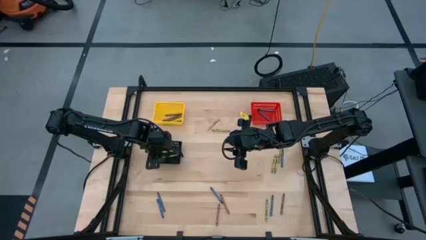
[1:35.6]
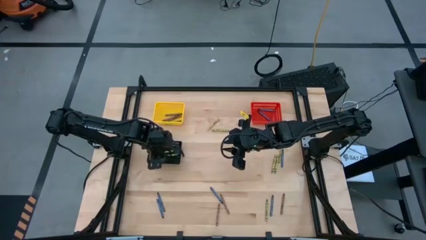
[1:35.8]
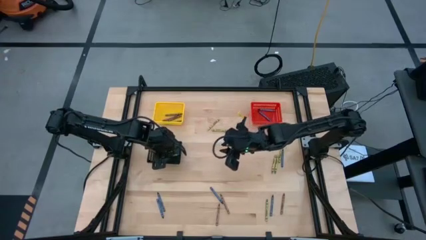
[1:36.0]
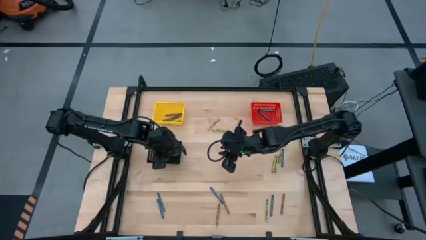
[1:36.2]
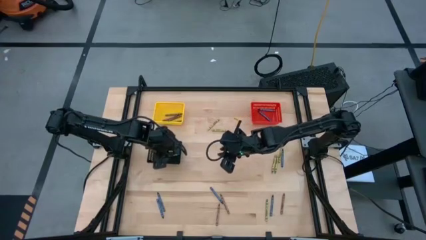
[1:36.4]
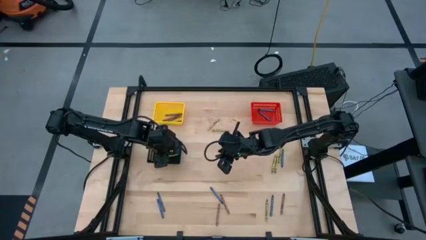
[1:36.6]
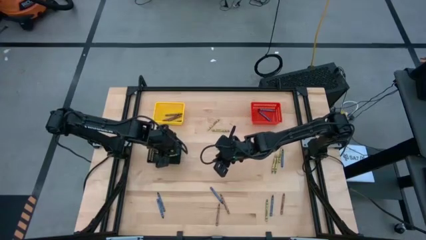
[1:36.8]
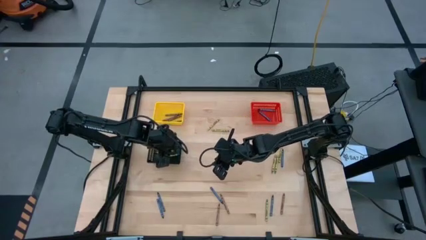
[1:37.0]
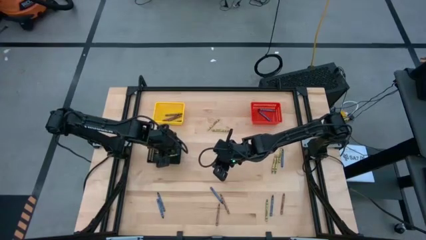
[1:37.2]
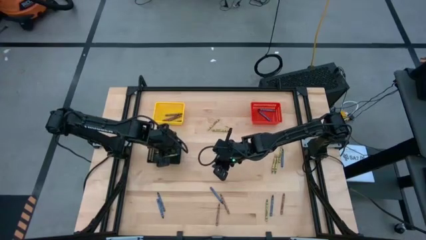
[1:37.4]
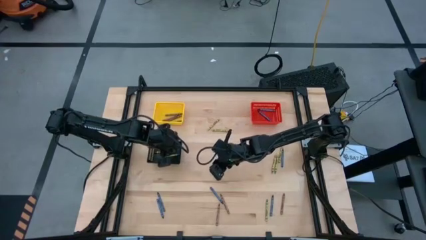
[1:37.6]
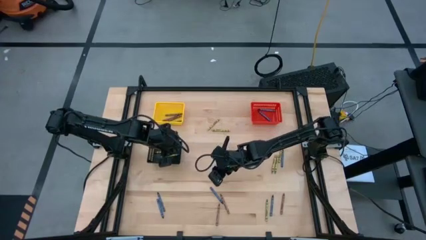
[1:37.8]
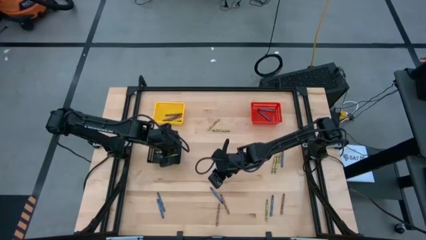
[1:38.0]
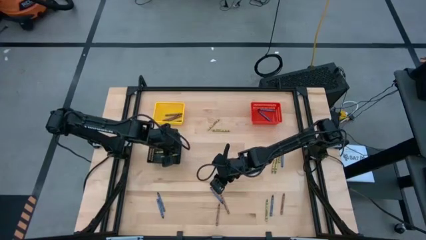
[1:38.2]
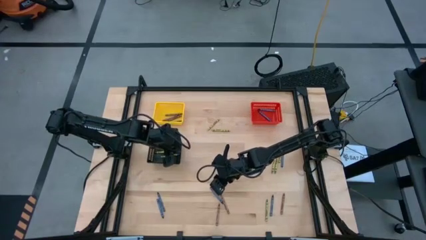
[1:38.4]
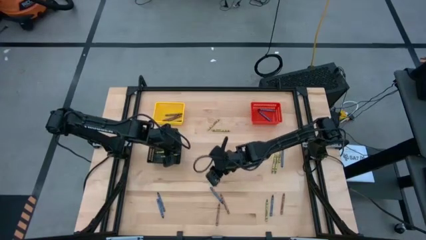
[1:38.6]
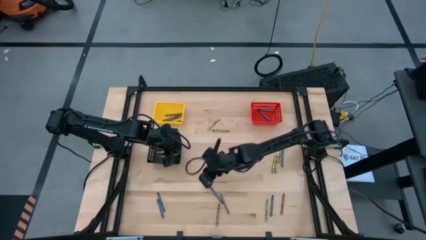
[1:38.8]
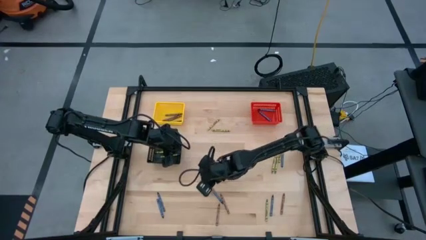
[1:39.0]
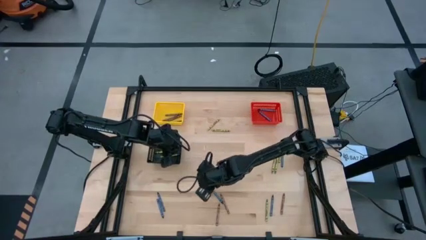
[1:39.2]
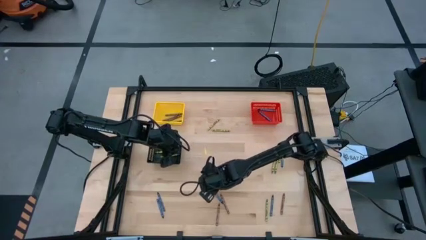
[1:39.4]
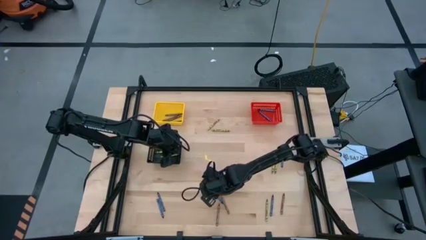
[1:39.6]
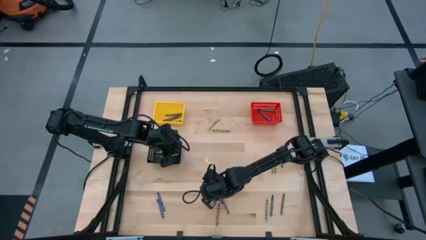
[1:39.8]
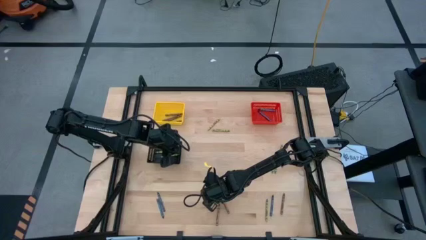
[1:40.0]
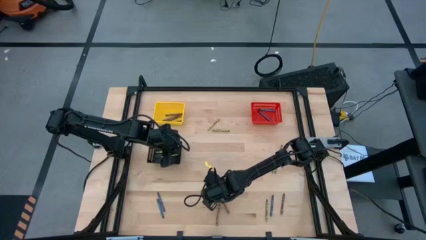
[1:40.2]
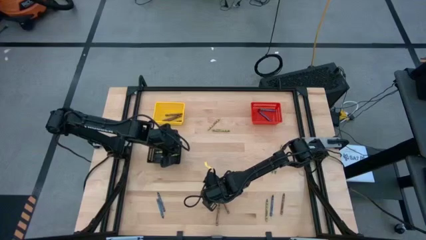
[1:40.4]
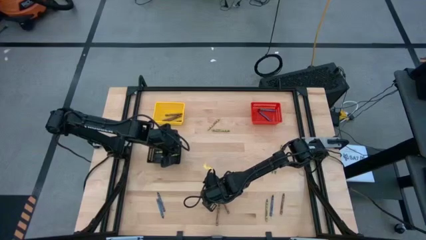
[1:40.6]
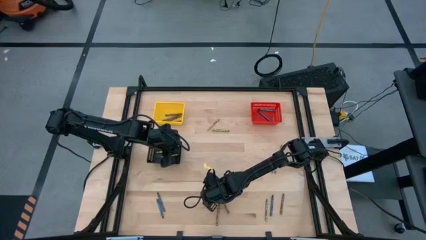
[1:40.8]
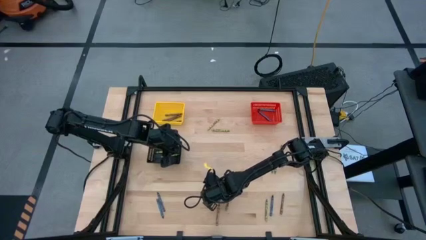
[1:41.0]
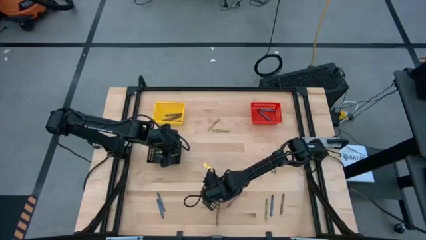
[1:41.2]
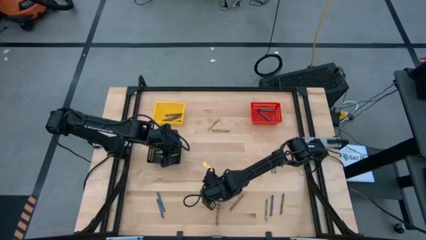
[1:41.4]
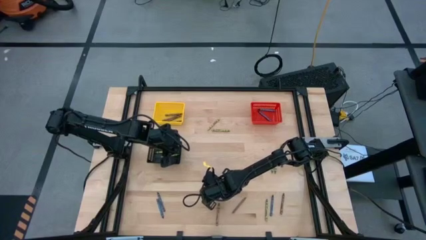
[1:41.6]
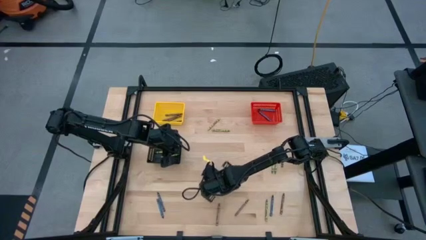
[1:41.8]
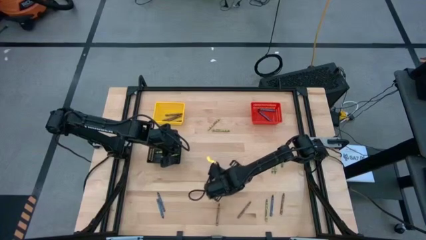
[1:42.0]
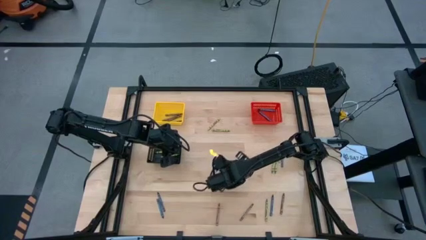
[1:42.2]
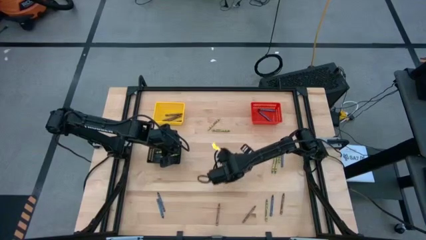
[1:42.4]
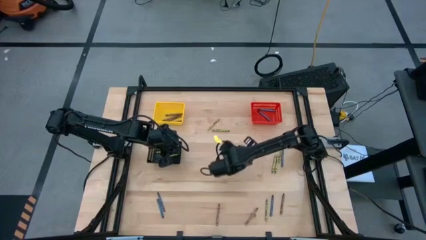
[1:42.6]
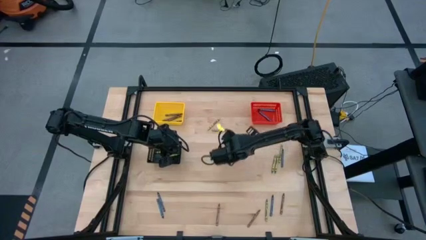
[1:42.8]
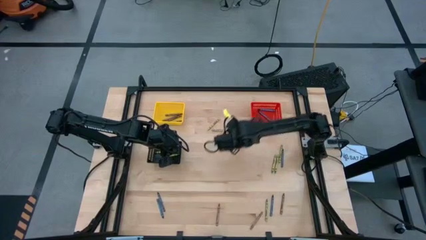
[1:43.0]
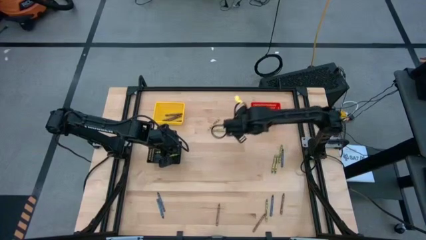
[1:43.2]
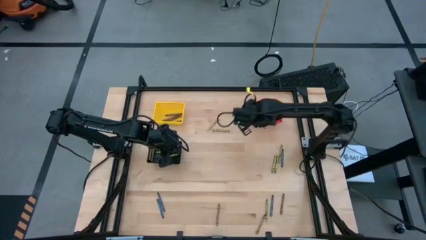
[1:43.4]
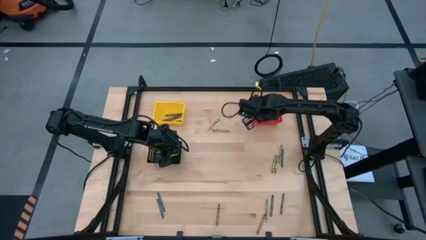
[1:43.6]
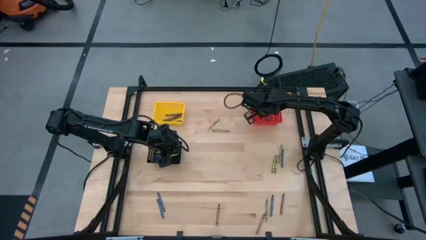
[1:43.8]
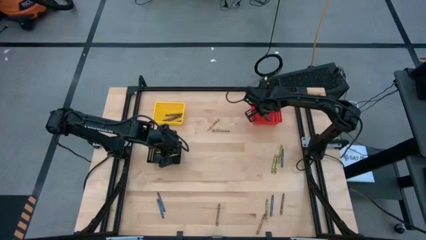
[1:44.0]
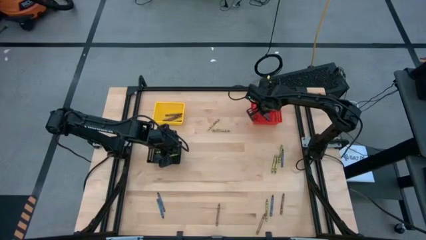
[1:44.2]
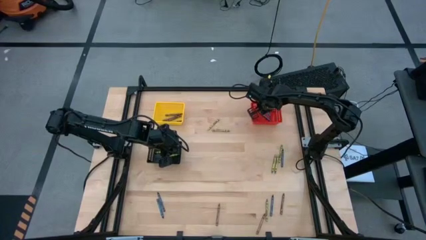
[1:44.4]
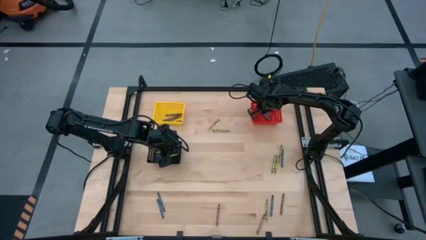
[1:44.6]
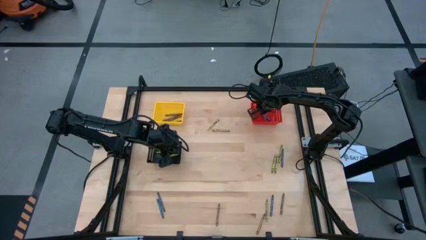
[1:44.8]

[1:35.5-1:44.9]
Task: Sort crayons
Put the blue crayon into the red bin

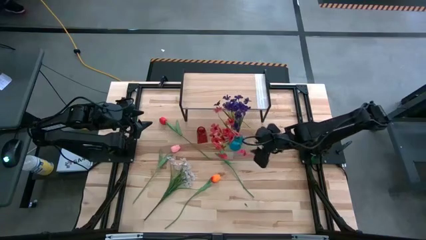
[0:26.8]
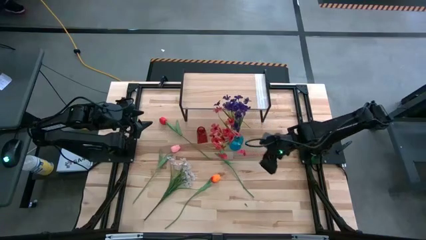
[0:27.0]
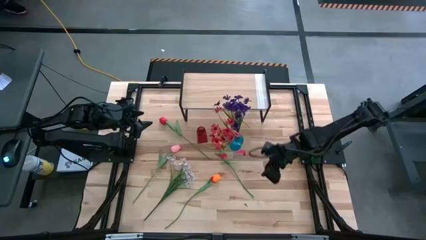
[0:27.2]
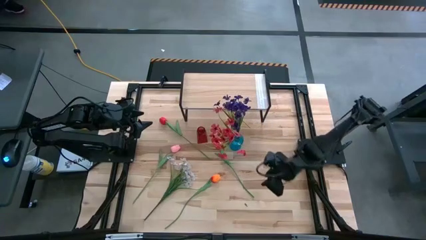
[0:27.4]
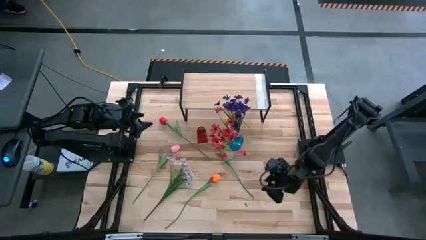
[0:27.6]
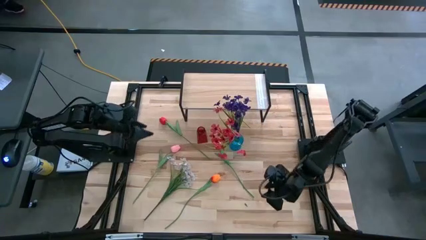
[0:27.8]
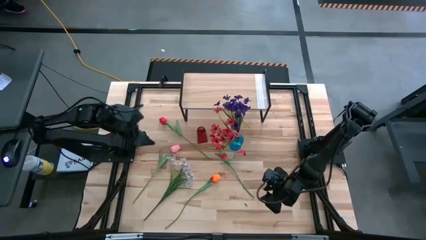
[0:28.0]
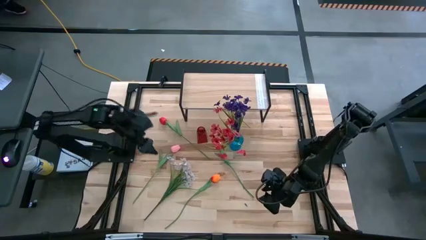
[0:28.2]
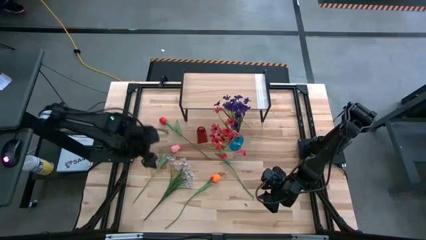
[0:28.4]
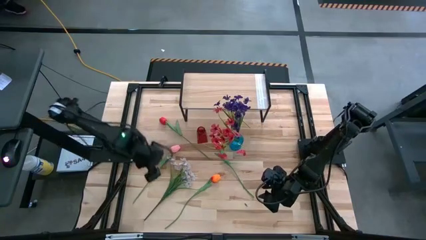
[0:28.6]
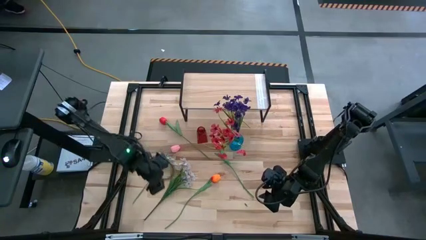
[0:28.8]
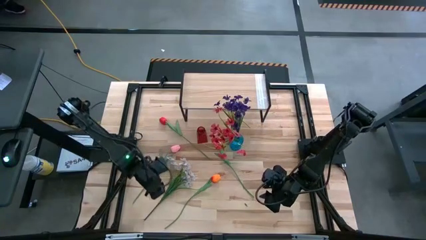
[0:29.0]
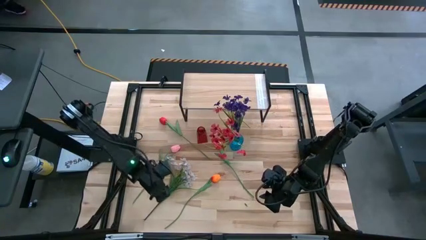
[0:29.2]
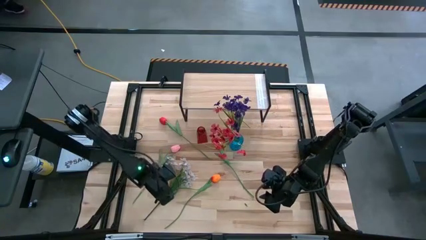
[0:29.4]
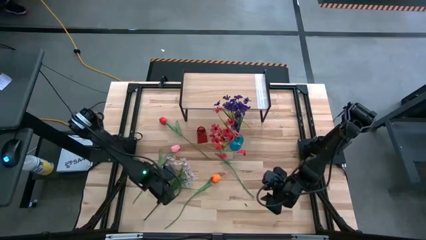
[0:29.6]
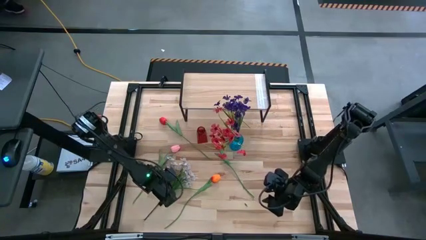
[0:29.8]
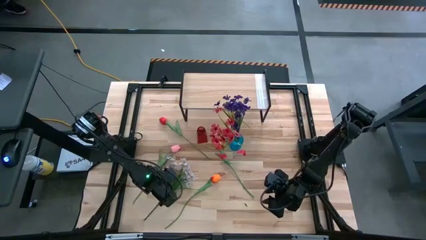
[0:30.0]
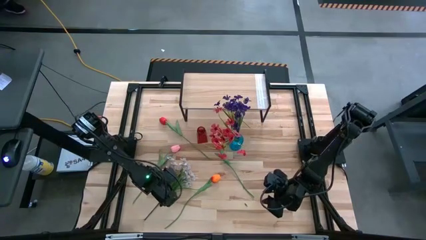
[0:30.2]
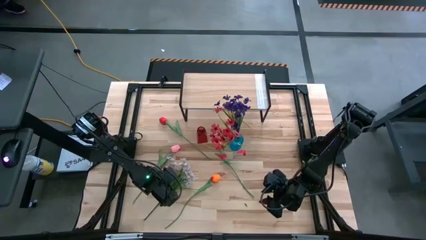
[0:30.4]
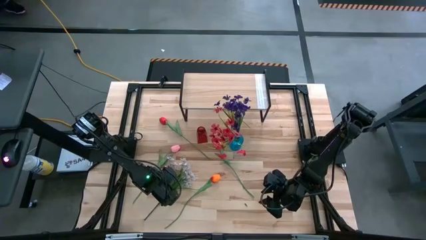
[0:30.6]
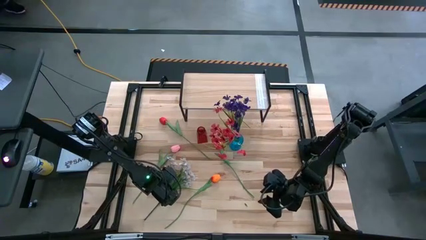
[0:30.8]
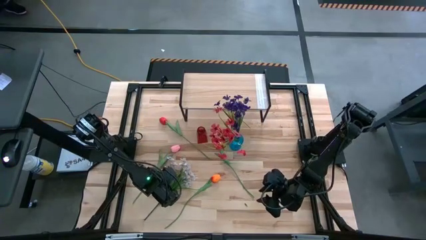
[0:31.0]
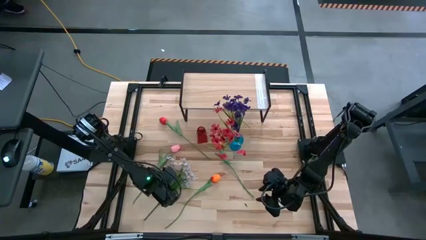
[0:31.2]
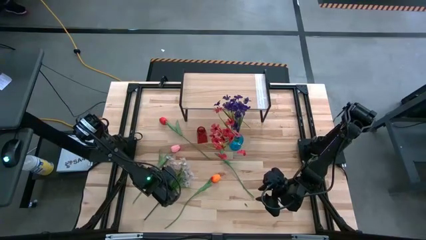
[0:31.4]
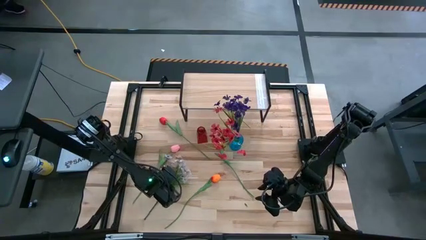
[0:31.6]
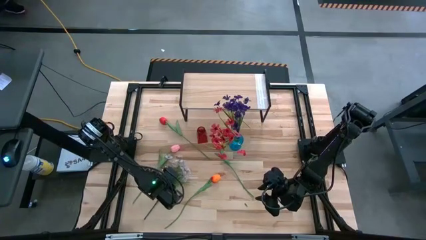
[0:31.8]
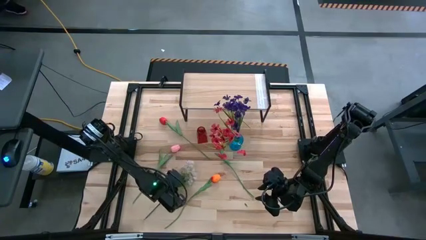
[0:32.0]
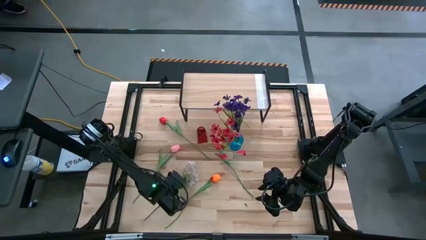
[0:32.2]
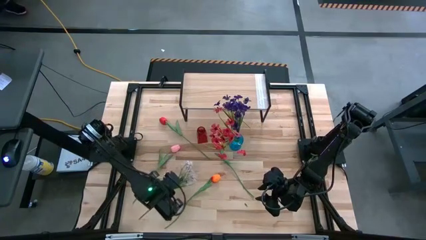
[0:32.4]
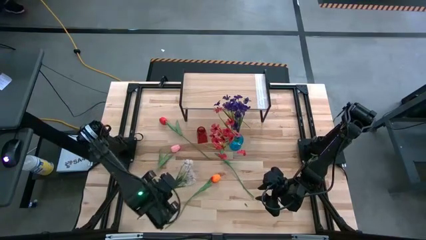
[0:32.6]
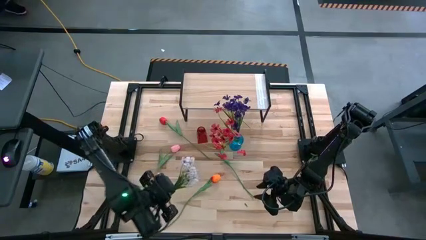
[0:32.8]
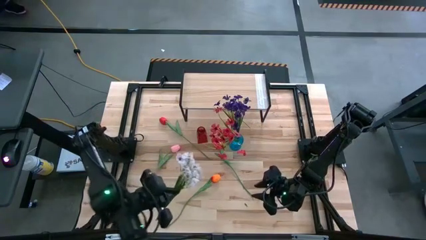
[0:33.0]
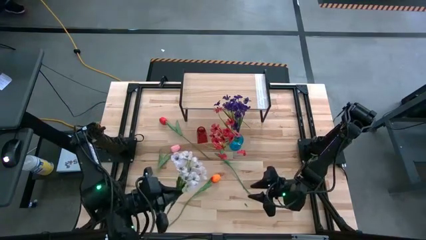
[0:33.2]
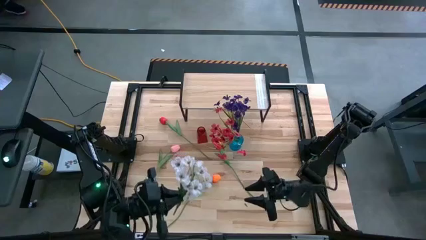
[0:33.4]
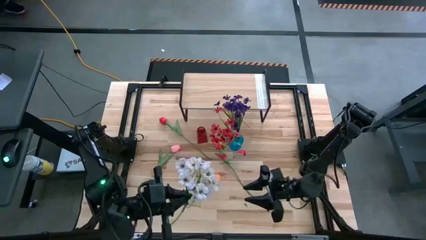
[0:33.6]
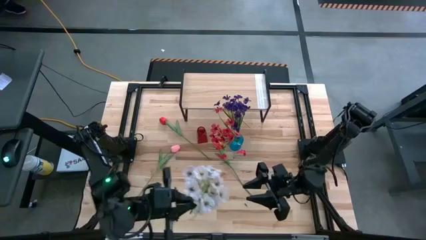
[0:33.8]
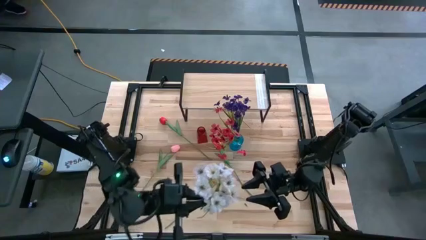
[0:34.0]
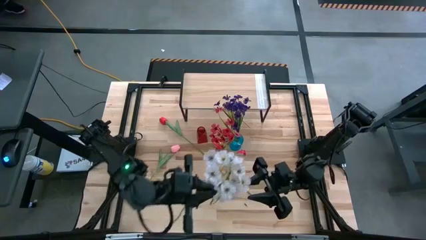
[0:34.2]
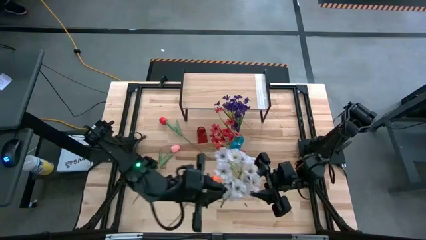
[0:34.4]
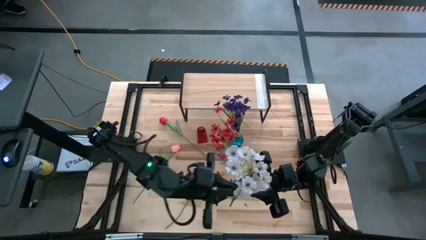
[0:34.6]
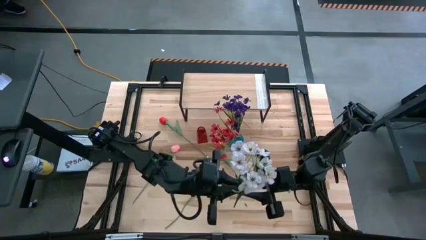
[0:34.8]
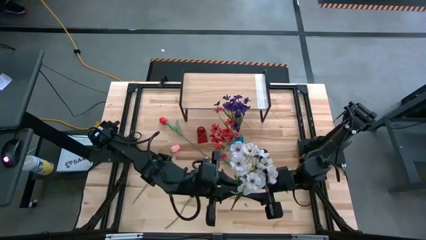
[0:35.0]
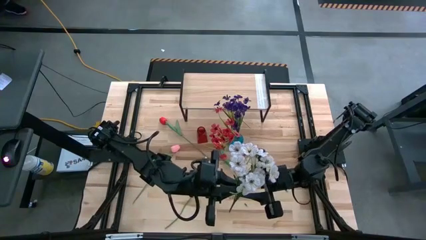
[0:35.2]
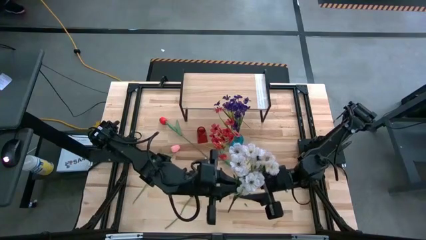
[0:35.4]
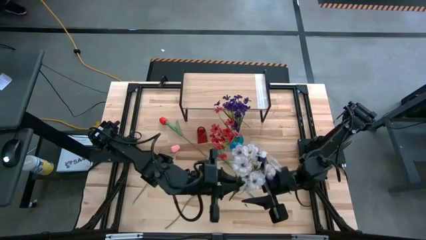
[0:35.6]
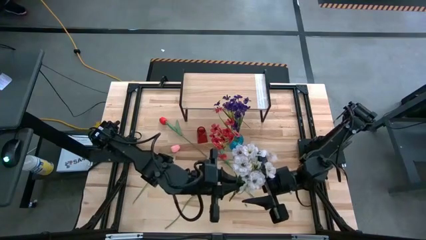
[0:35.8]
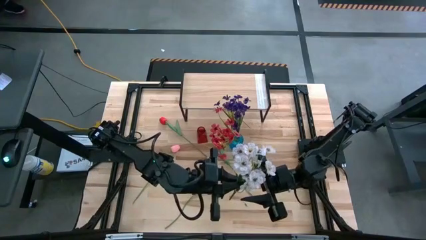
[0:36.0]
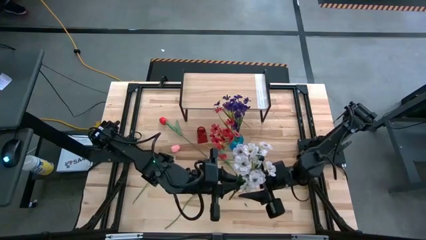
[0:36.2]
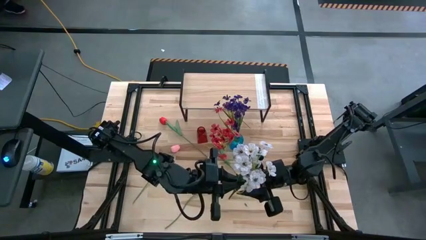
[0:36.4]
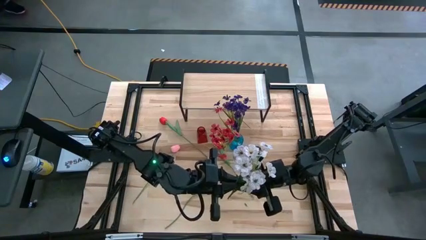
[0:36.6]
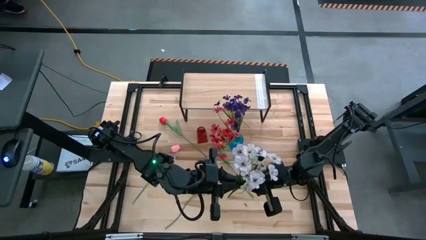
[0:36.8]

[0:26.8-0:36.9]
Task: Pick and place flowers into a vace then onto a shelf
Put the white flowers into the blue vase
